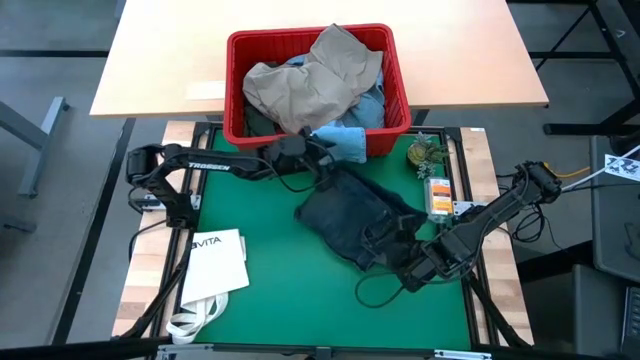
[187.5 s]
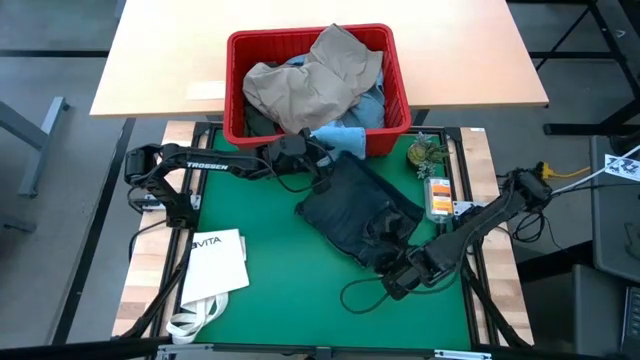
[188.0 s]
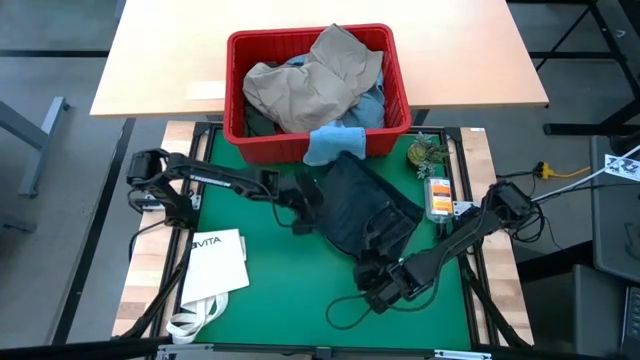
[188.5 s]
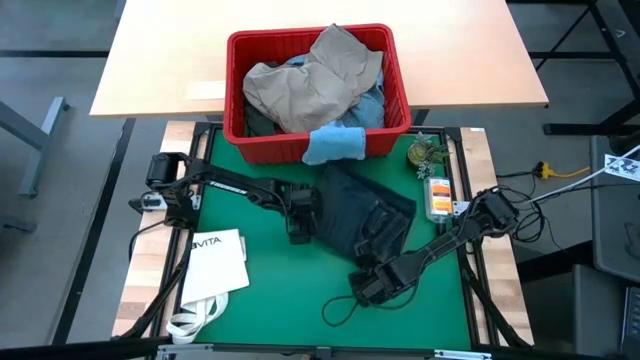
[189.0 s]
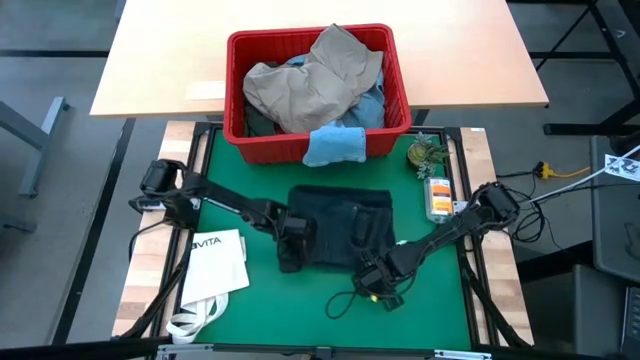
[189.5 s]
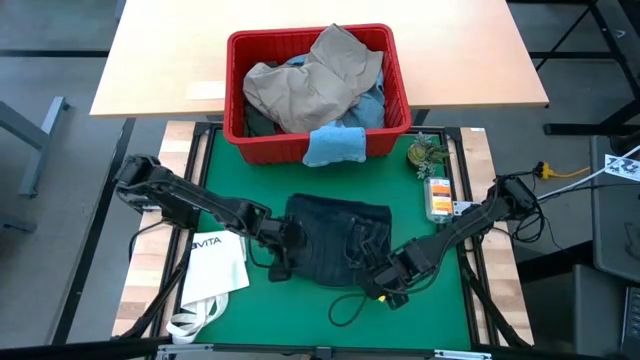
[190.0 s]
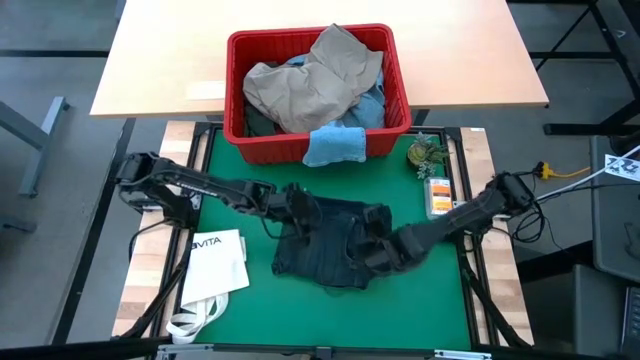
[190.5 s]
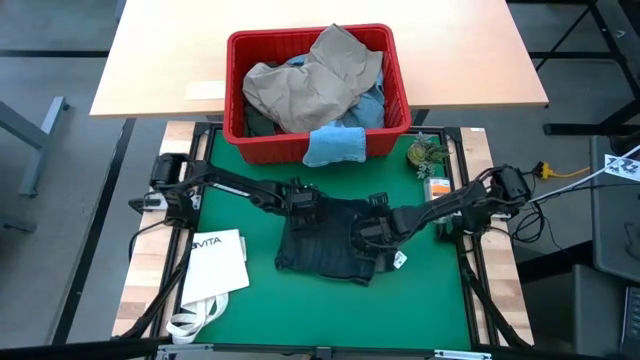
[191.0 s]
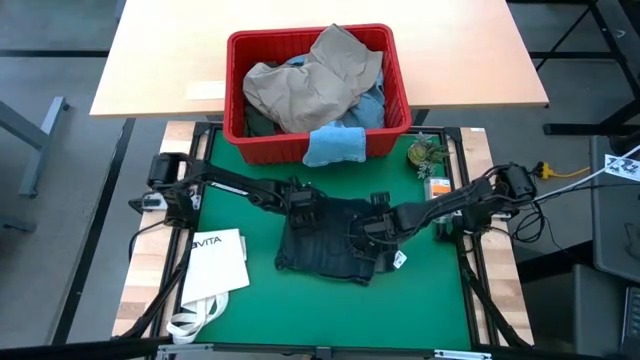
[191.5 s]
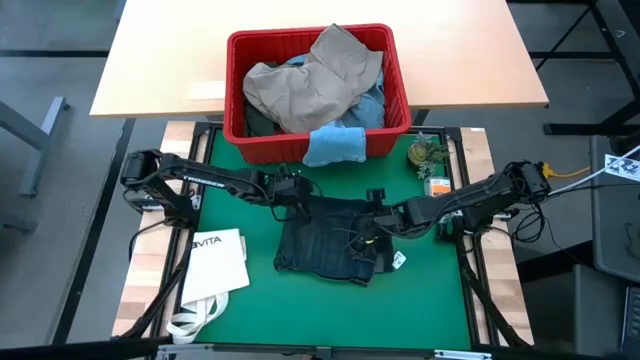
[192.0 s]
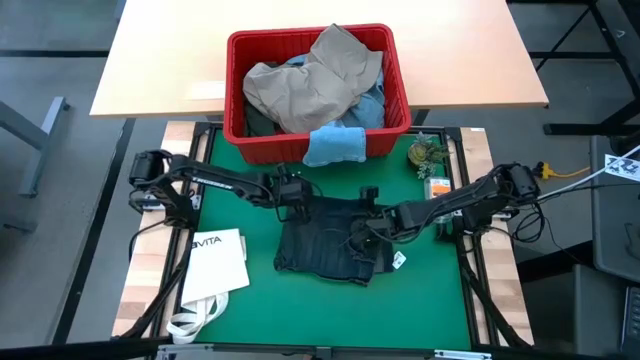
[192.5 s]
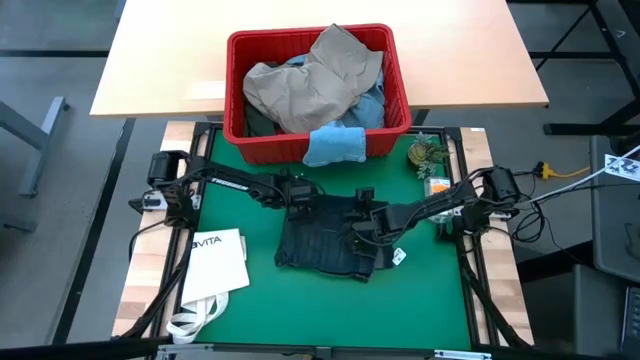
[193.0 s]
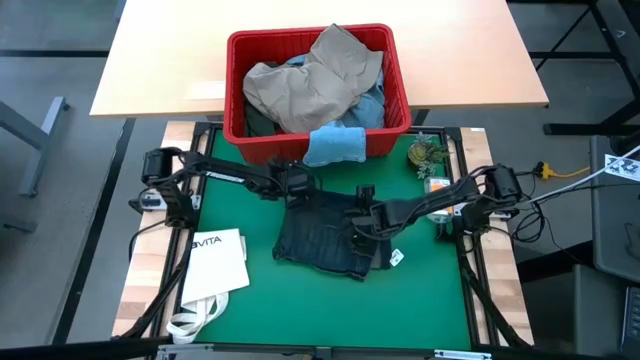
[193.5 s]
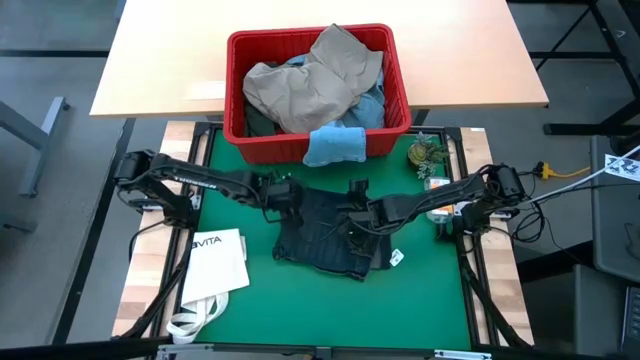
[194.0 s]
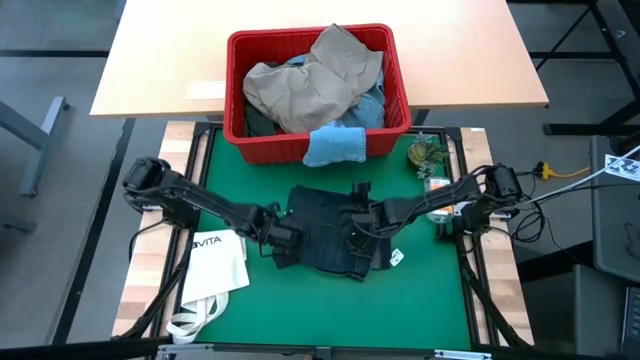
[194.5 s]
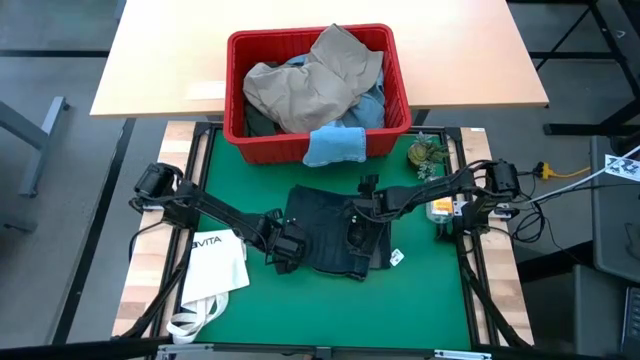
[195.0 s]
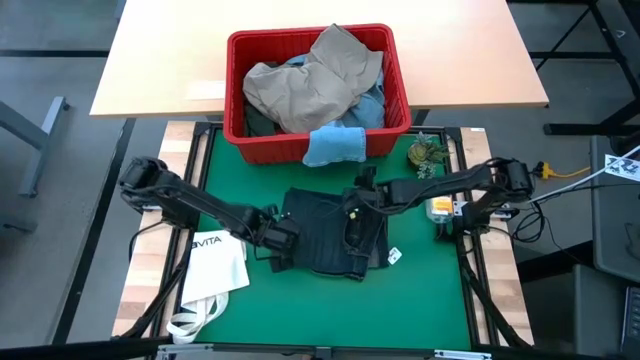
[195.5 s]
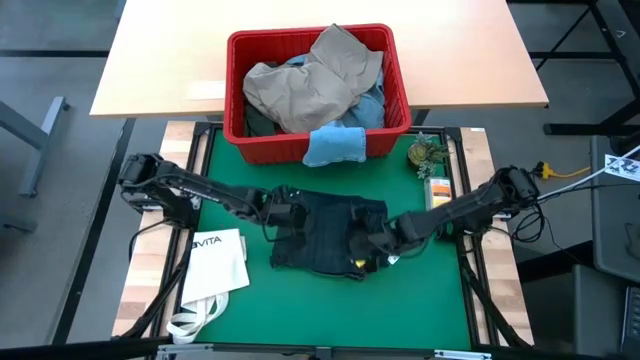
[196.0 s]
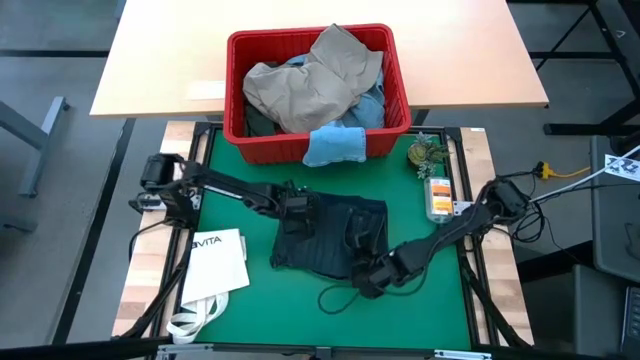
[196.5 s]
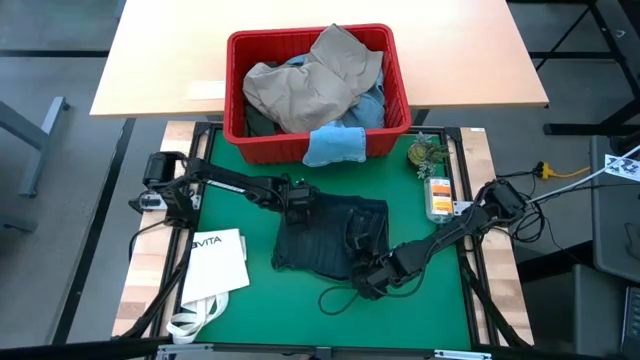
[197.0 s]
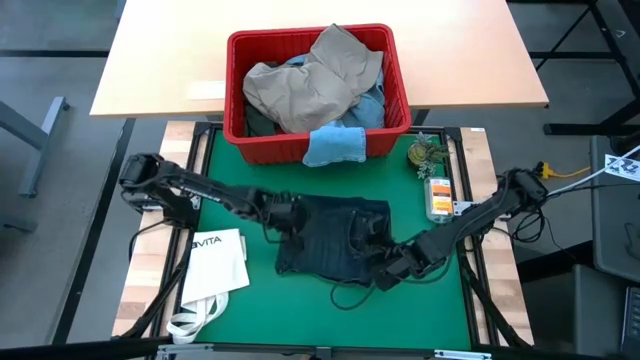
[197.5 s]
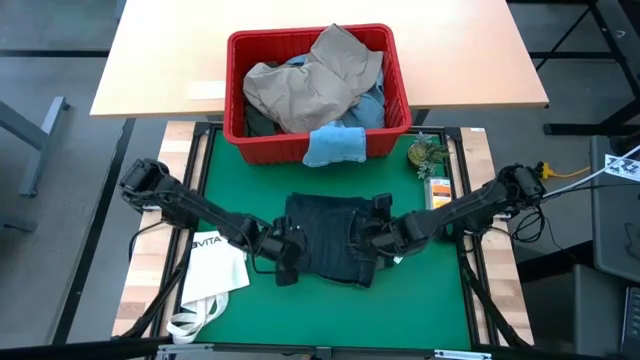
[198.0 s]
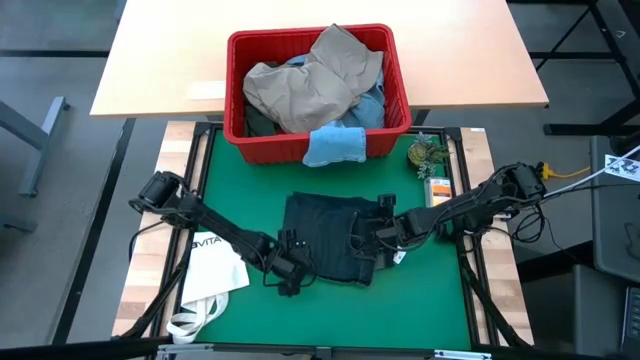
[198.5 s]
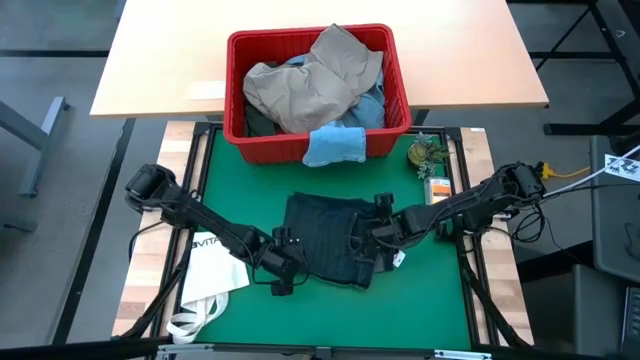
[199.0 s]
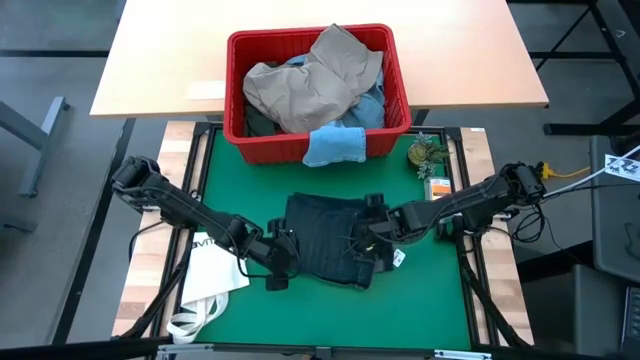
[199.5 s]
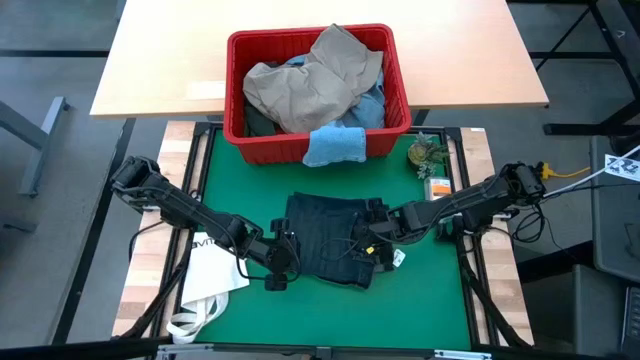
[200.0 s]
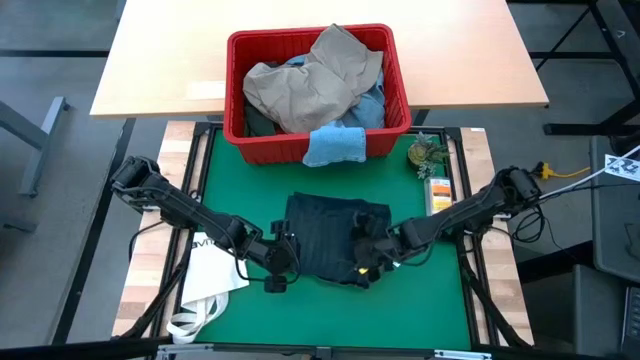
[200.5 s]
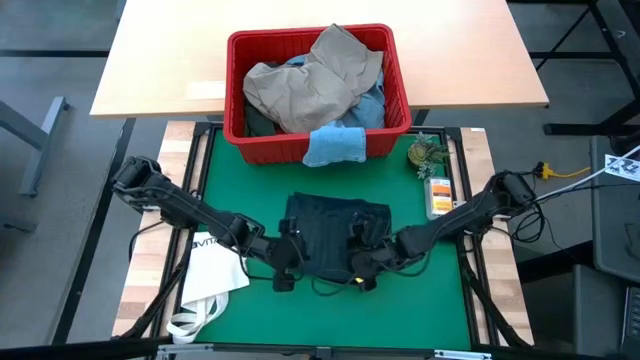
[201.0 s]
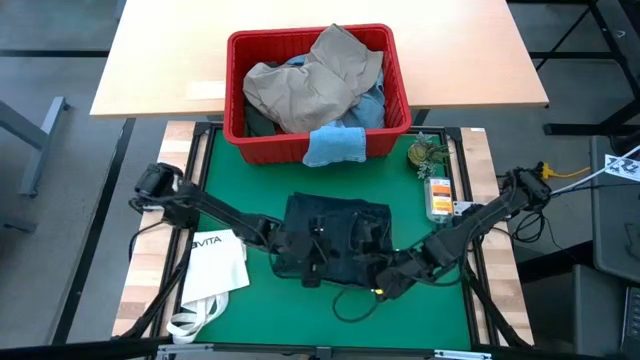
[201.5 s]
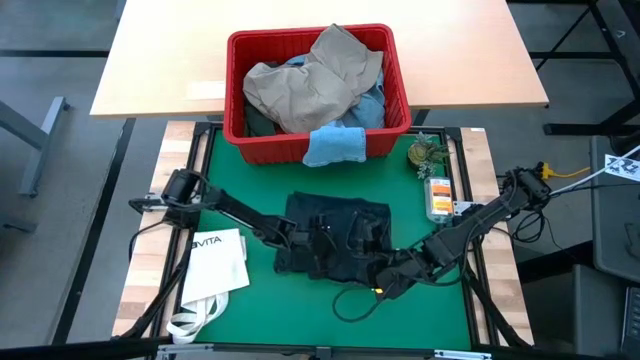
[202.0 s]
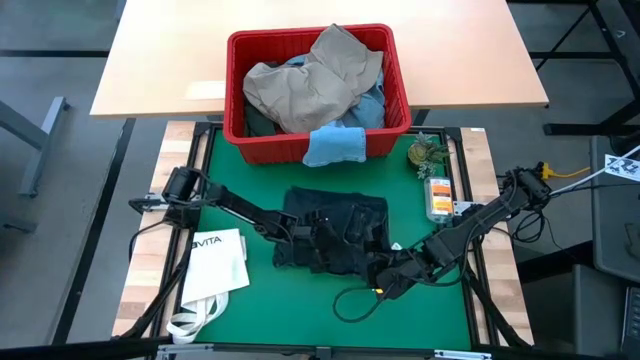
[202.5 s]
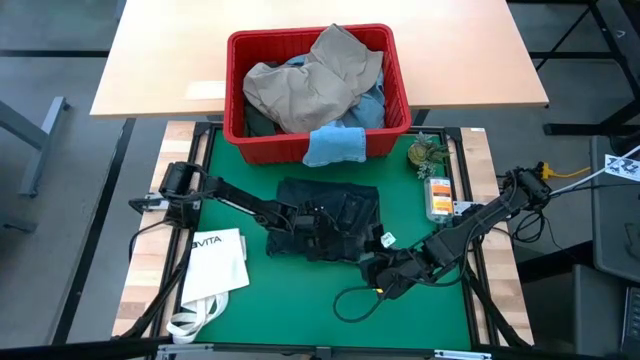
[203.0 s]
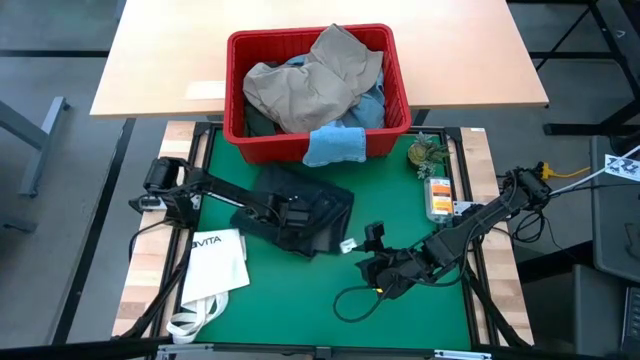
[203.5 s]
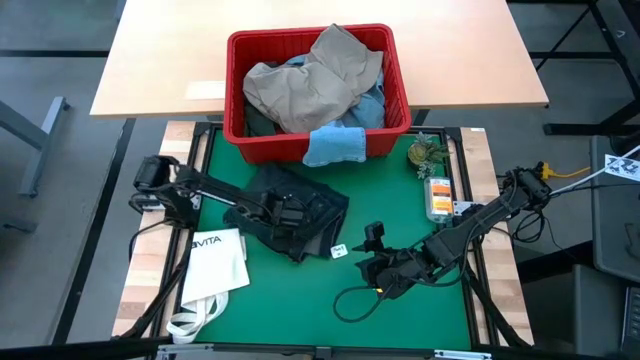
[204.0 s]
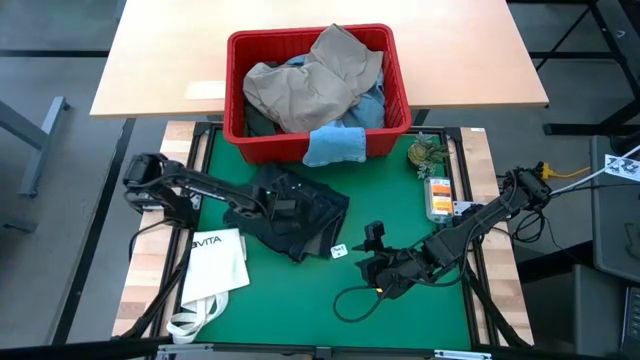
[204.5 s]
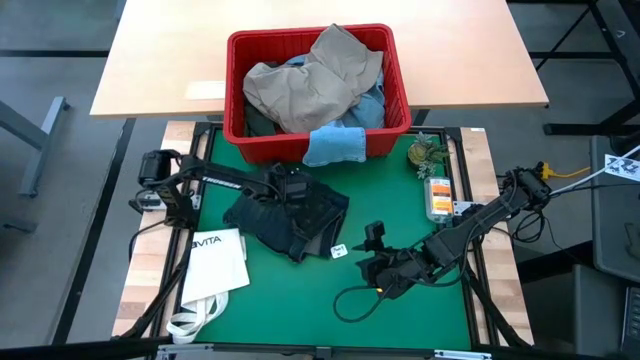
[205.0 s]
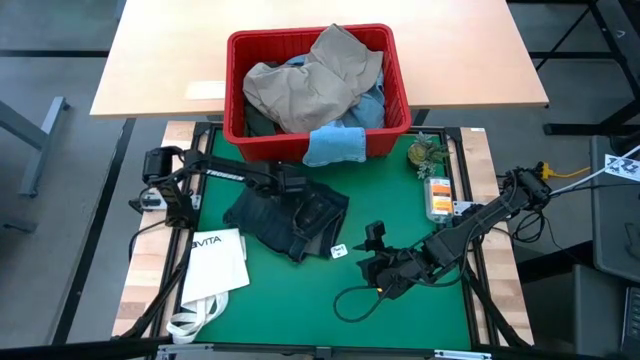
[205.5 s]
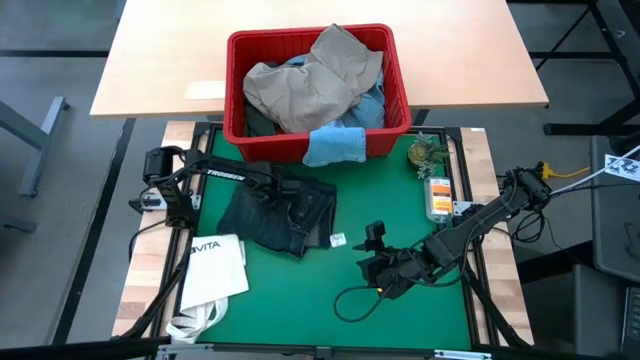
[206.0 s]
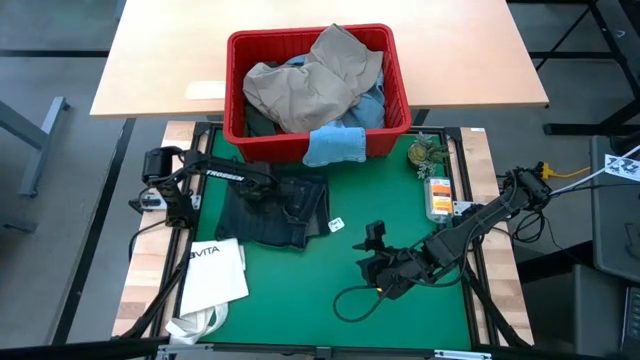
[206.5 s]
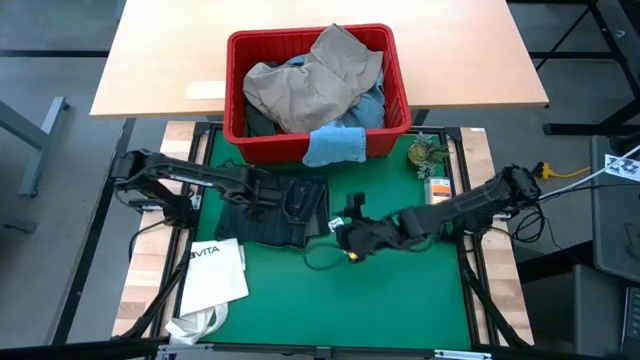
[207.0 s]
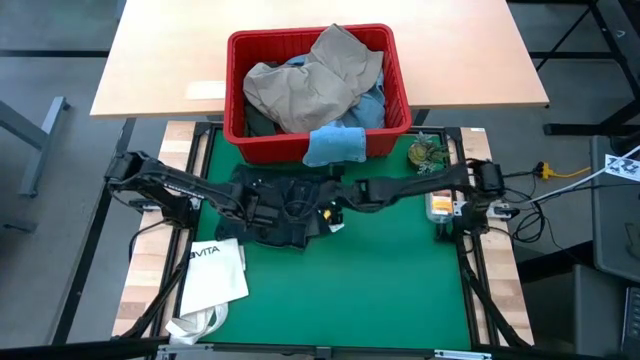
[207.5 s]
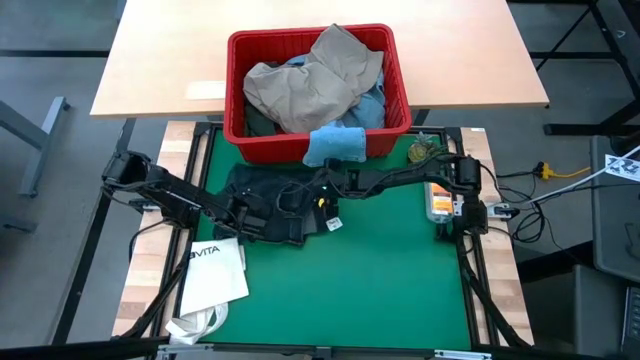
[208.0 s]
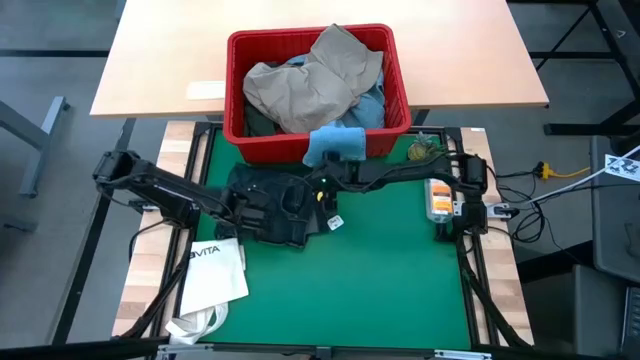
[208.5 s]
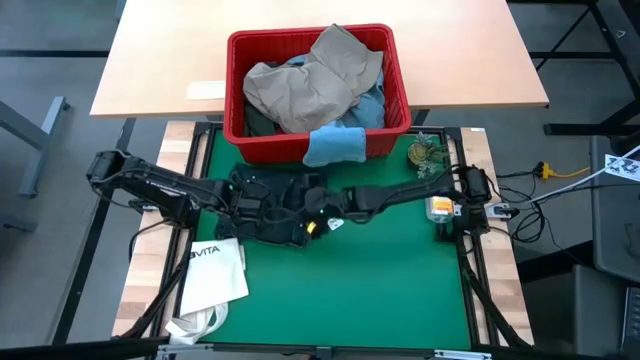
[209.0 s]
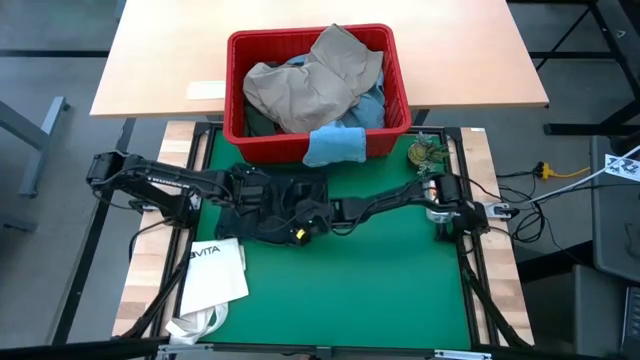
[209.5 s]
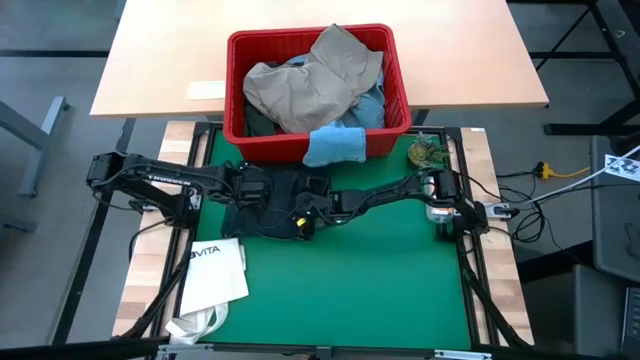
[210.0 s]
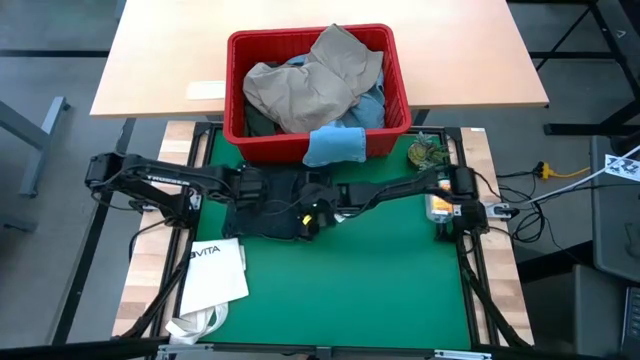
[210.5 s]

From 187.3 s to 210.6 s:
Task: Fold Laundry from Bin
Fold the dark blue pants
